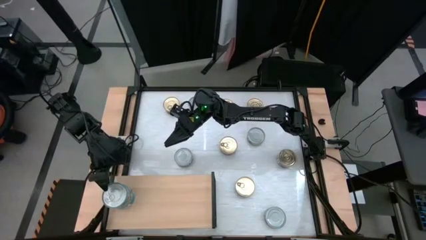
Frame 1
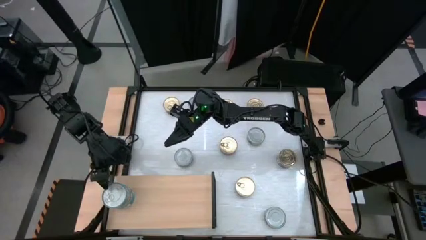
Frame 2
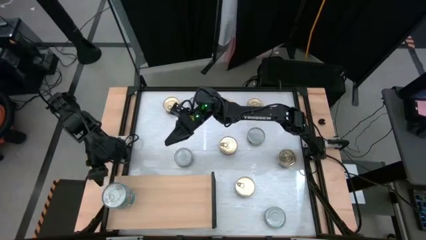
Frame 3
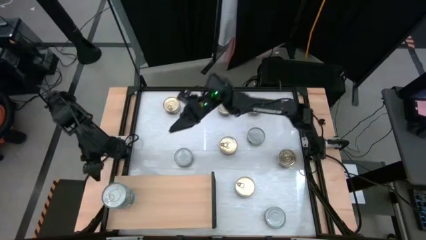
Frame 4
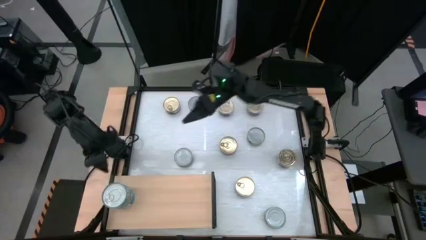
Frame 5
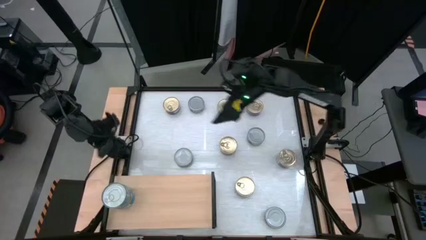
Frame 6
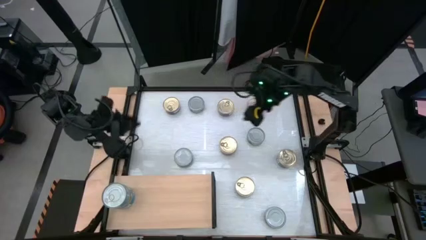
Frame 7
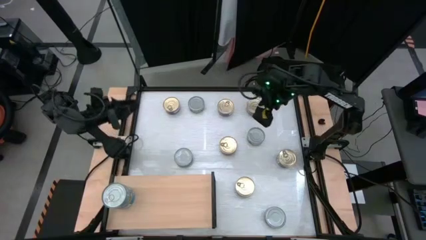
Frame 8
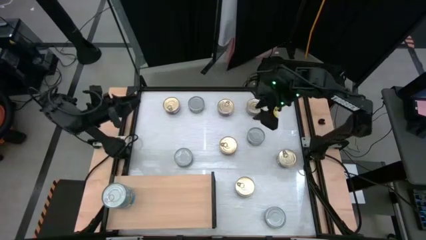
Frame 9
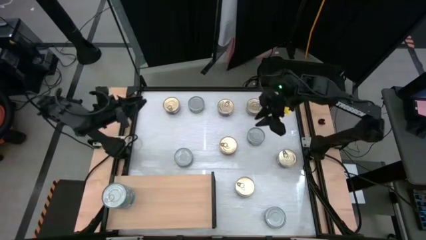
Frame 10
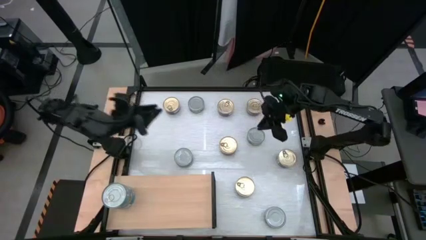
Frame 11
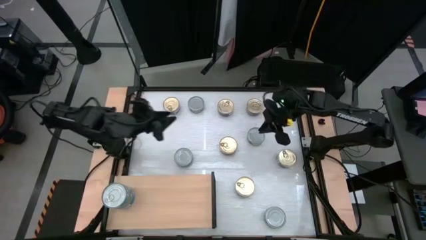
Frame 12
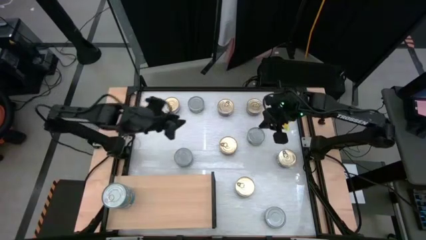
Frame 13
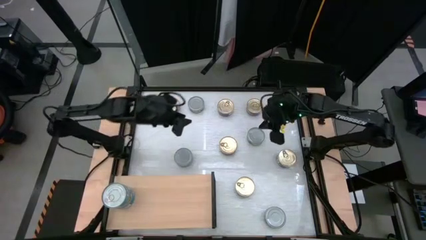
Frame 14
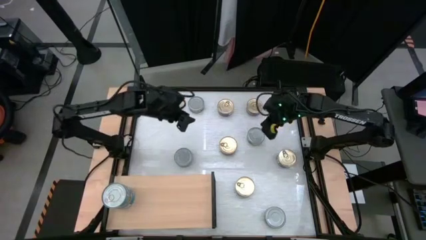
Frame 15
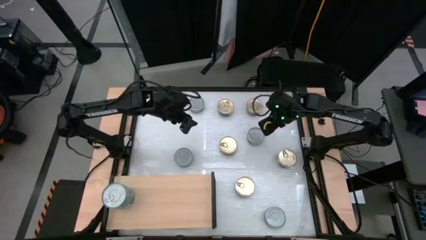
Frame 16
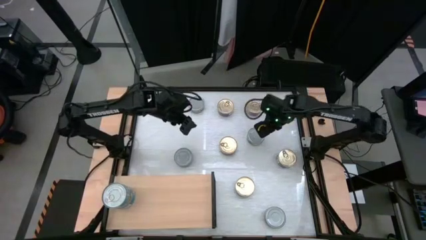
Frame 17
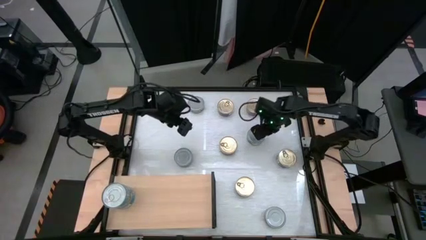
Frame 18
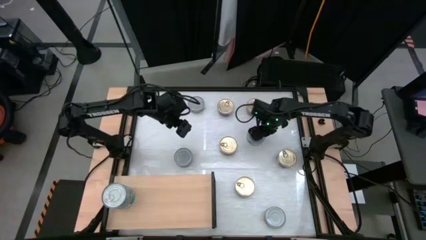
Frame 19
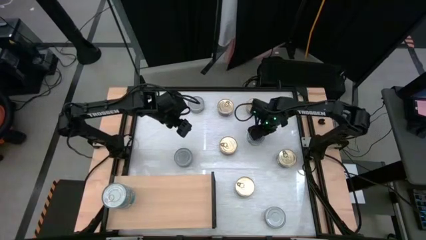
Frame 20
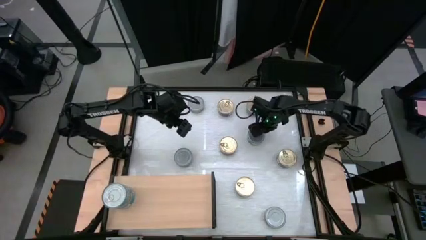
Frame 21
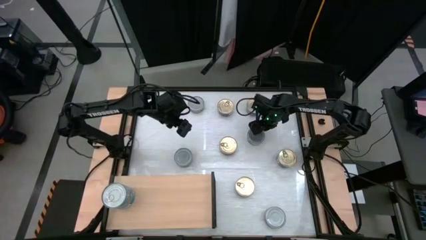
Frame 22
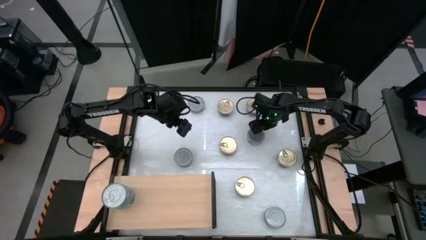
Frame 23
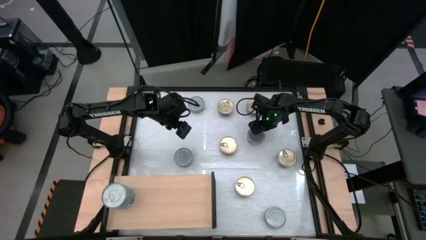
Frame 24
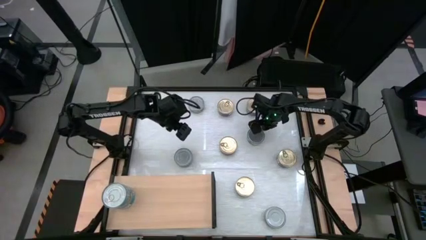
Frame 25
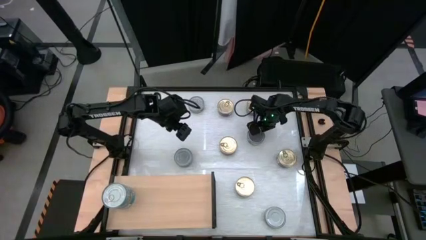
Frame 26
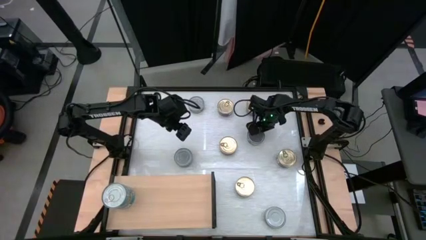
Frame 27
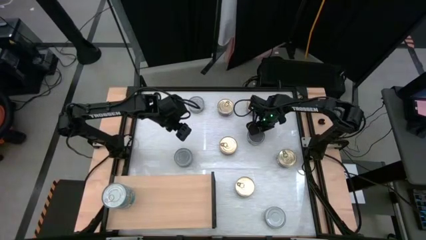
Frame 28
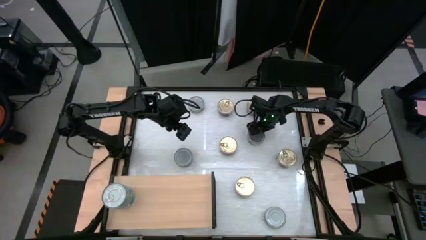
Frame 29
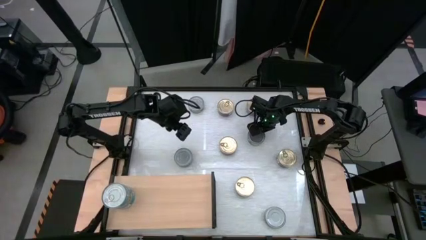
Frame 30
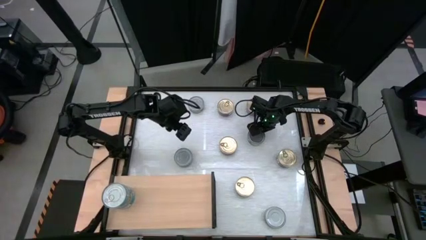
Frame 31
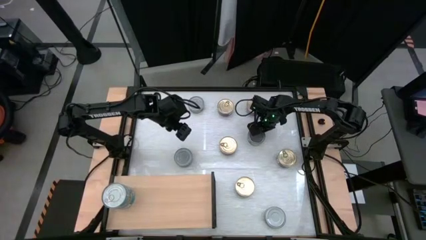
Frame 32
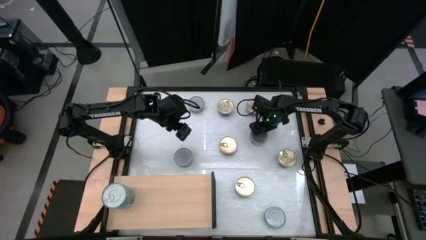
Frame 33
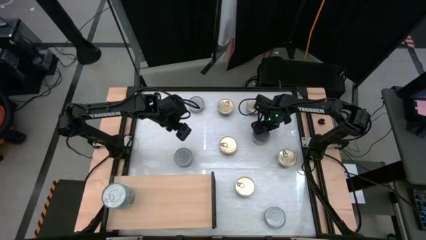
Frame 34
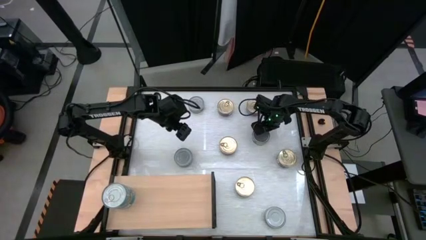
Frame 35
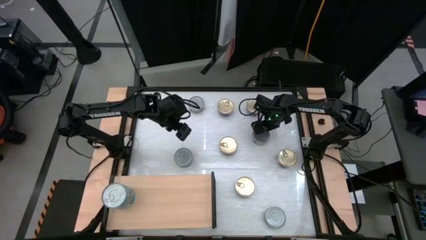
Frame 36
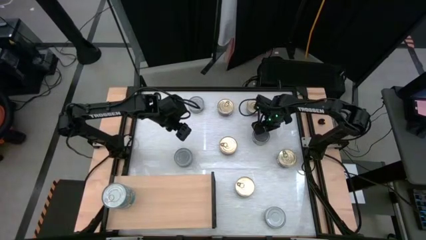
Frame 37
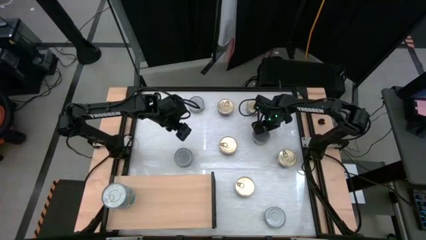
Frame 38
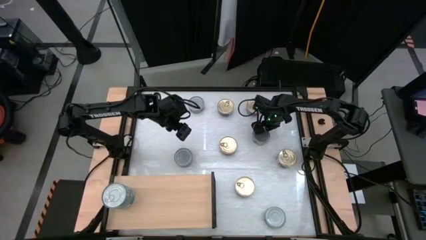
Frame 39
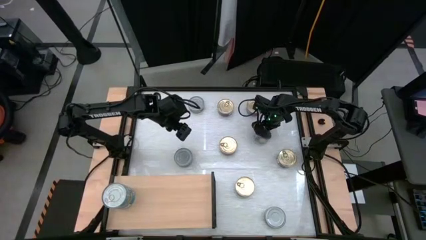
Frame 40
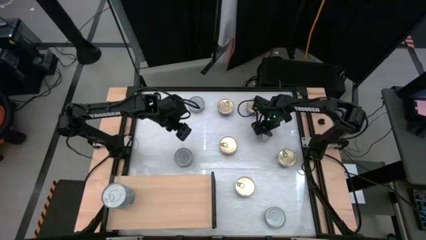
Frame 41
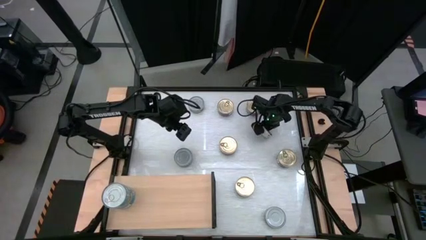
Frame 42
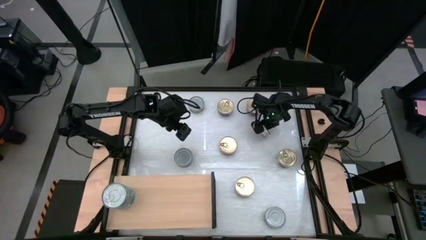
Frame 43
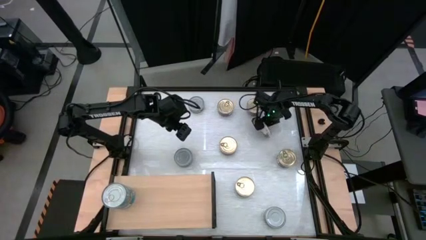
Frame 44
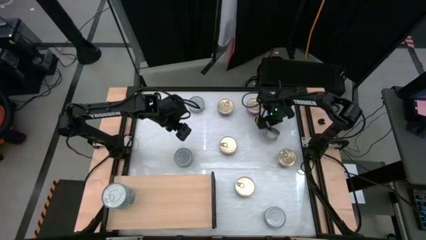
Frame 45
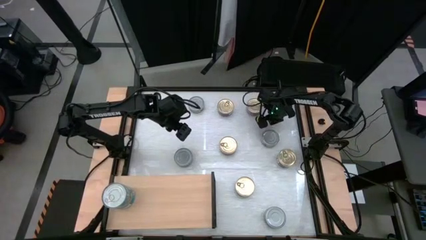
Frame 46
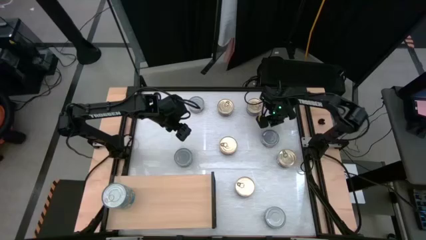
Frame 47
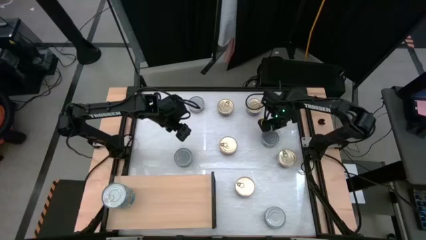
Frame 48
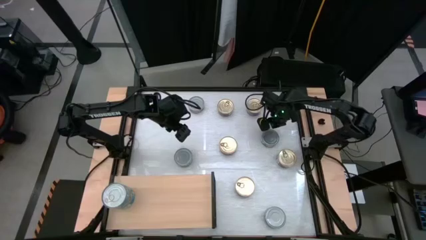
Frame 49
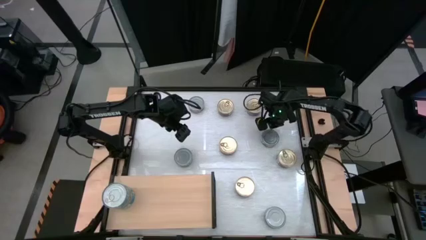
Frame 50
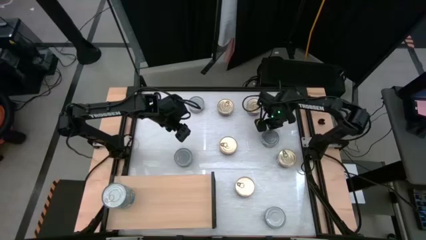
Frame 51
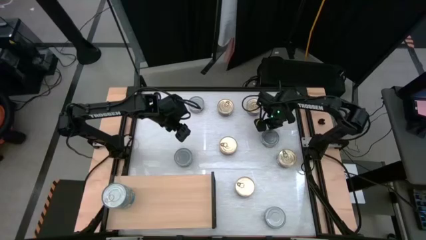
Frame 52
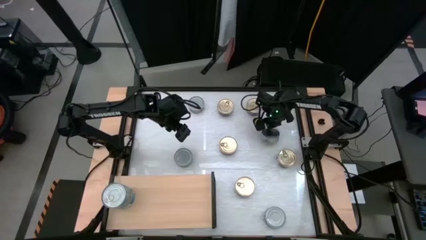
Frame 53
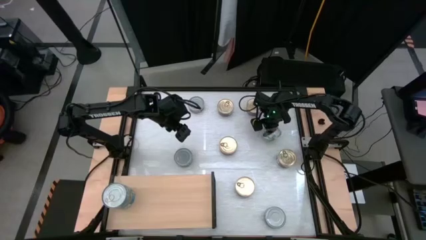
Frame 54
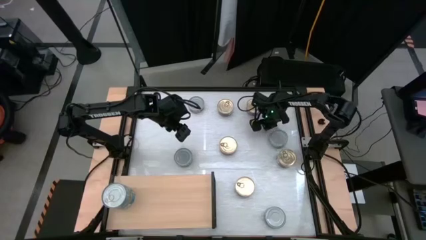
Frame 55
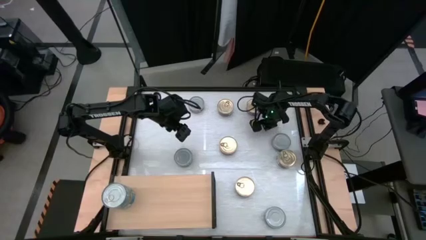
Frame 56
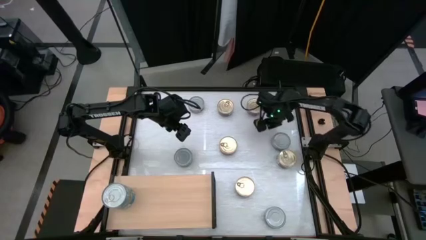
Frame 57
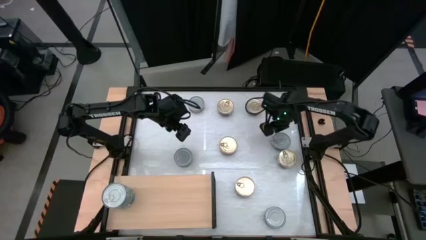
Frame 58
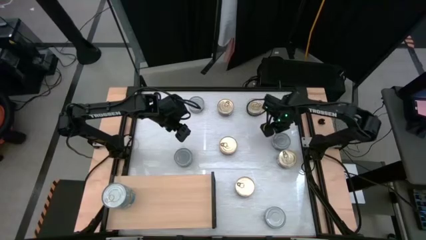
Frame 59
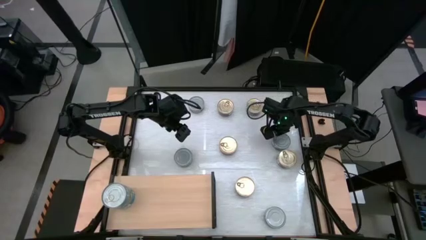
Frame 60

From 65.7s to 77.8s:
Task: Stack canned seafood by type on shelf
Put the green tuna can on the shelf
